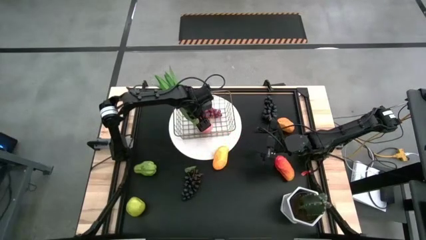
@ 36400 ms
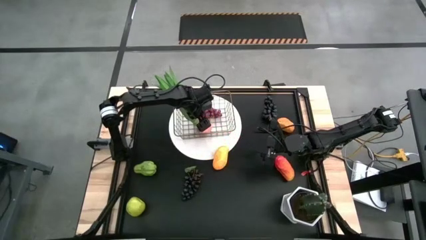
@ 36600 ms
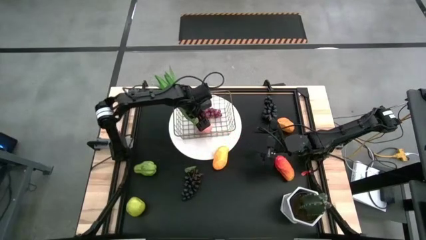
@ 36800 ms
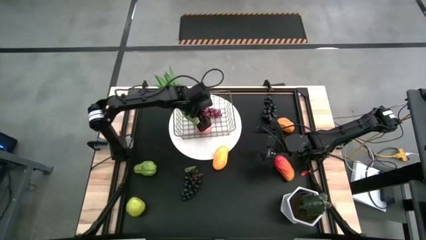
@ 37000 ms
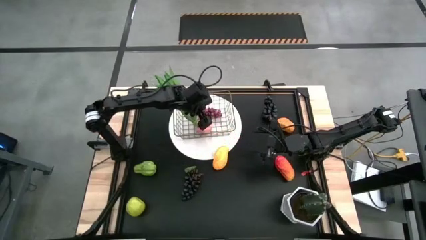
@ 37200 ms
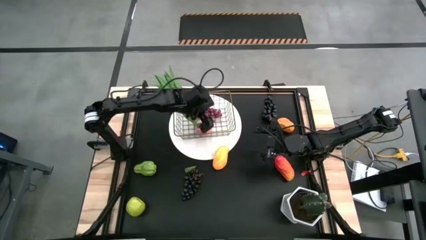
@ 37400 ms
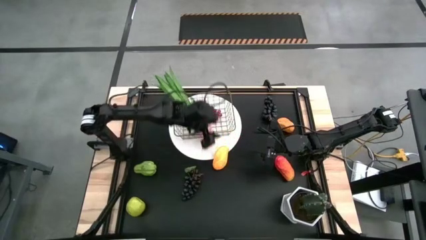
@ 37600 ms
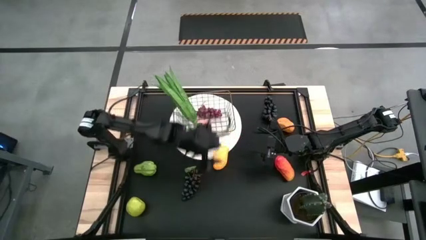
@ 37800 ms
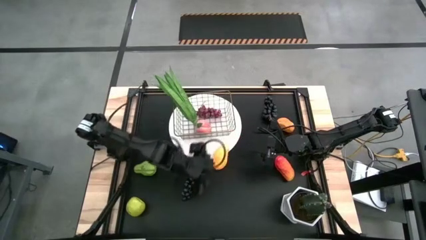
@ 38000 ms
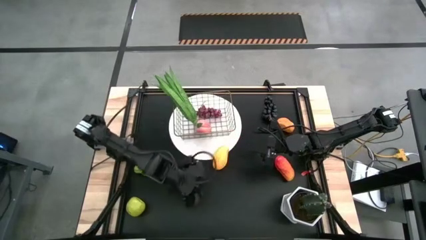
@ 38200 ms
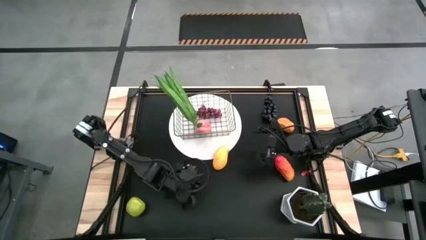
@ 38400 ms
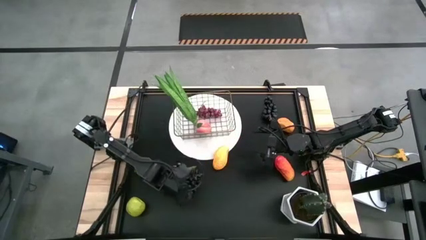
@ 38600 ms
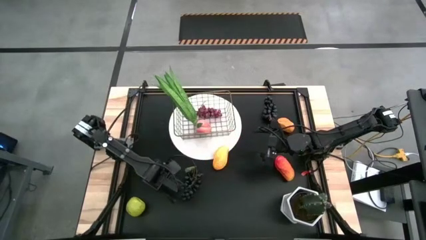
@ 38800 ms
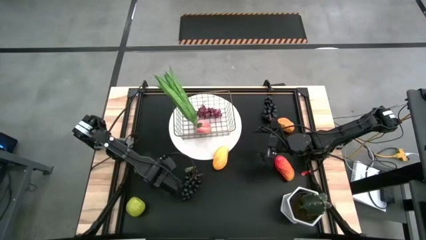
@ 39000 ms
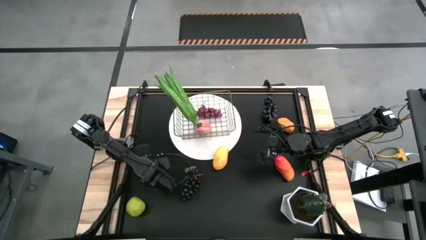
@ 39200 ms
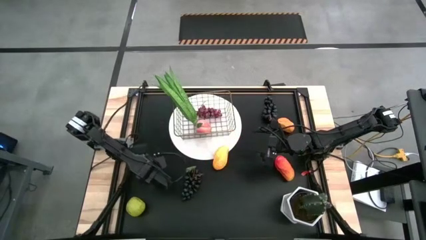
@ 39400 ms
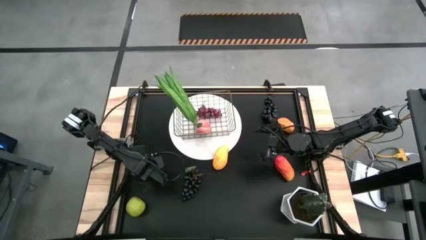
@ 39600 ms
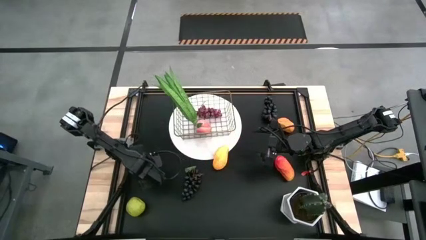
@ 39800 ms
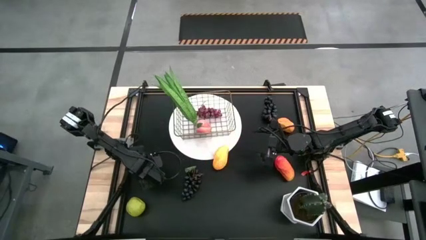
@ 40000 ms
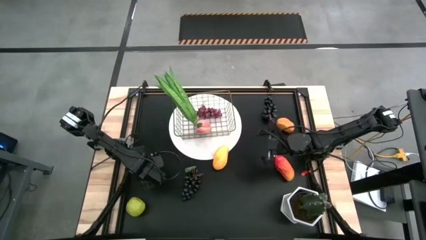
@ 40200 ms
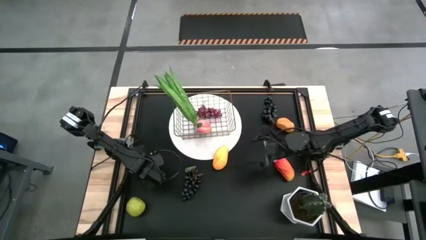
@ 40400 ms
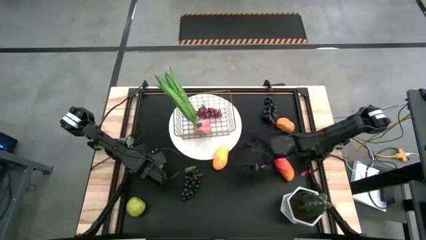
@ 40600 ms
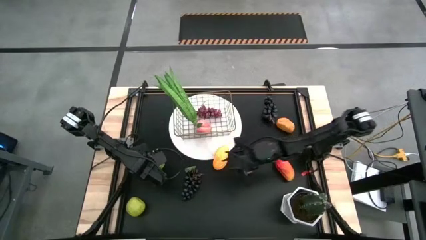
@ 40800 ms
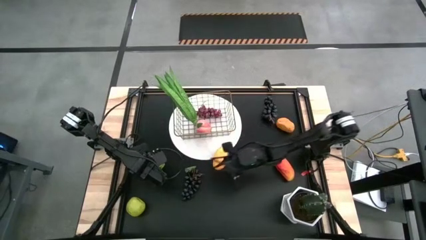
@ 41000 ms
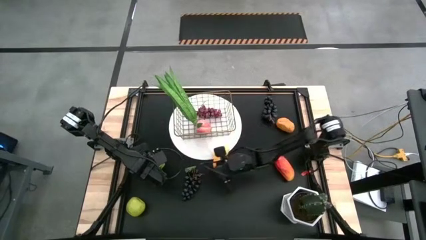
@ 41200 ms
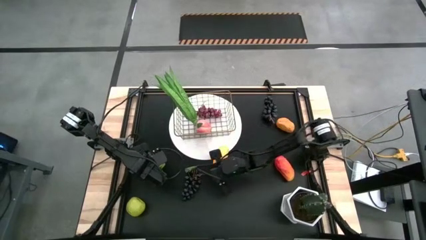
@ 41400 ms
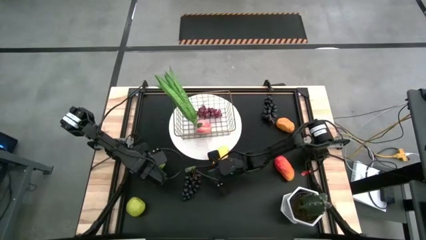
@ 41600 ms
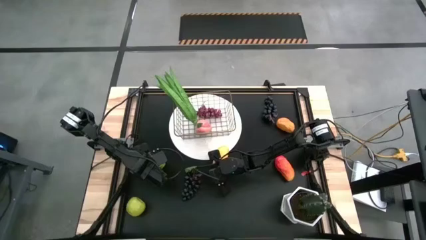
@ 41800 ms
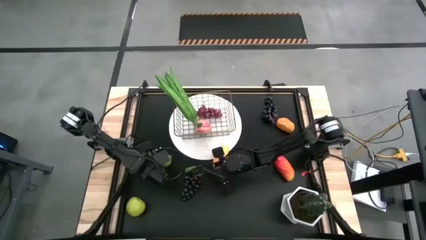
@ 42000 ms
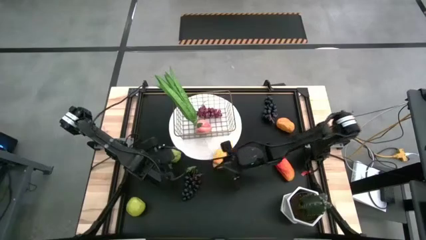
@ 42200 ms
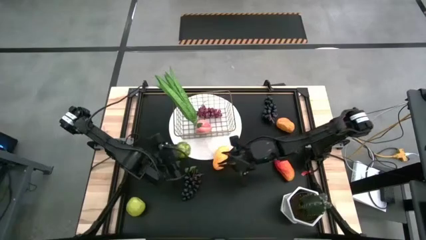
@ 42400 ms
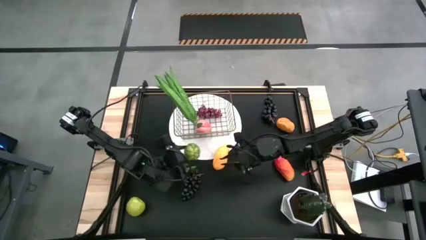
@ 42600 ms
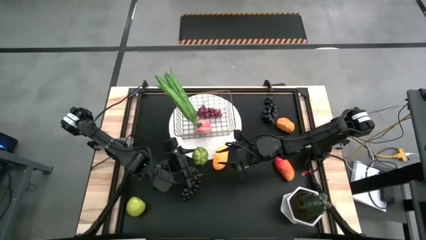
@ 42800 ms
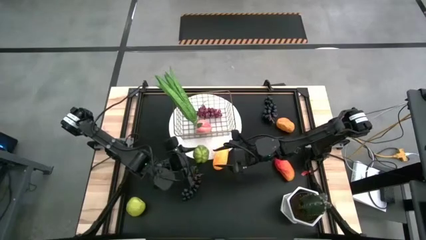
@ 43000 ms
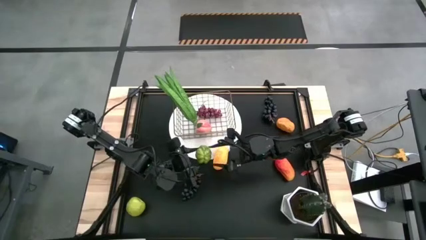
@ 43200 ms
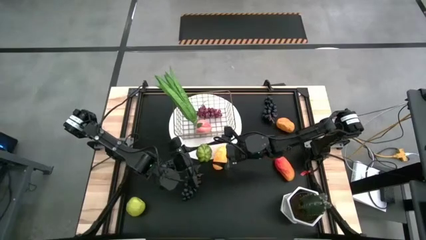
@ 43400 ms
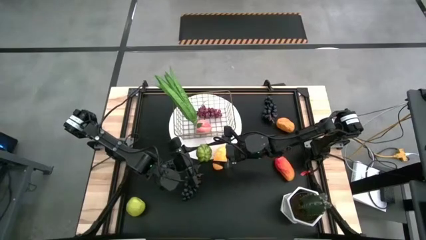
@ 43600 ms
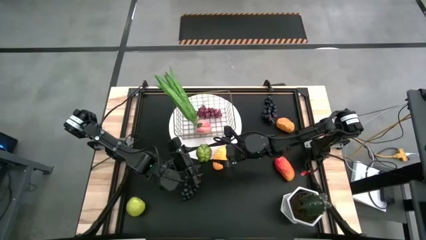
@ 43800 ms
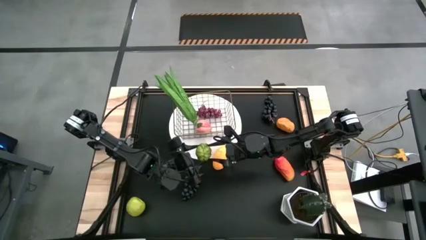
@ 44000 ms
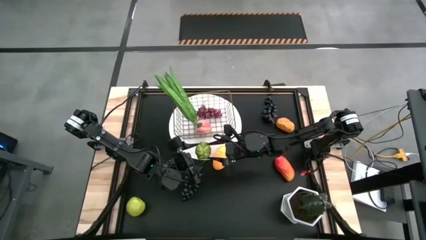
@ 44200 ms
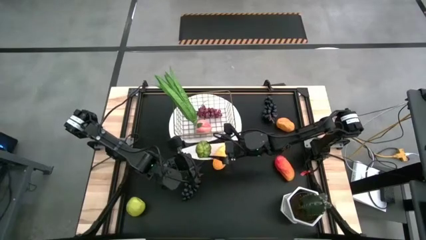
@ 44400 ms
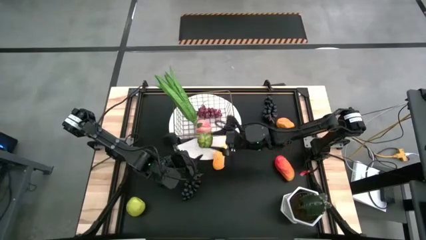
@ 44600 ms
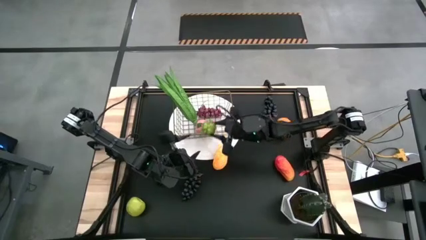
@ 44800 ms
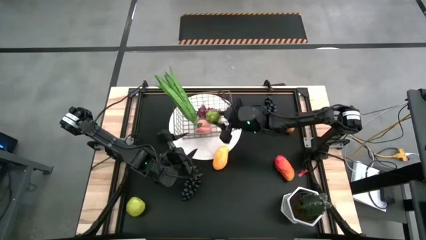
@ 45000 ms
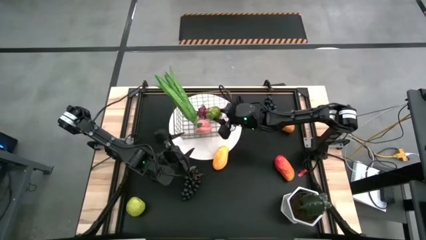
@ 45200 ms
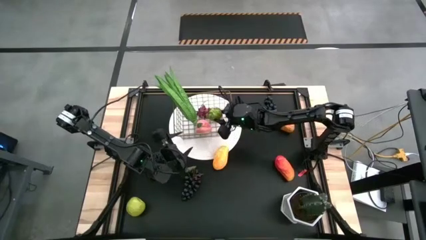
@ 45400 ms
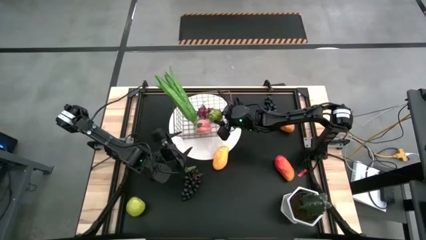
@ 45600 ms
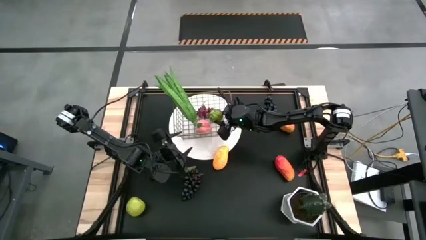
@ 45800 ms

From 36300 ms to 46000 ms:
Task: Build produce basket
Put the green chayote into the gold wire basket

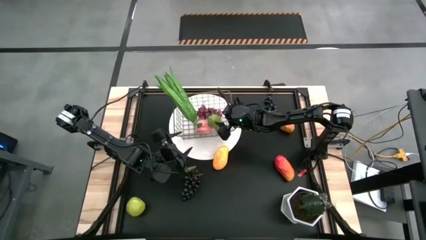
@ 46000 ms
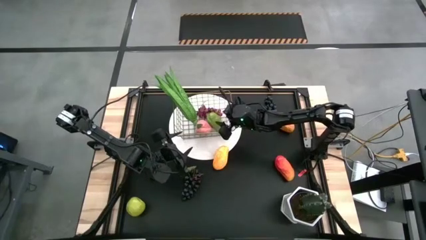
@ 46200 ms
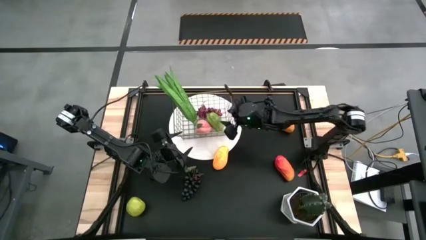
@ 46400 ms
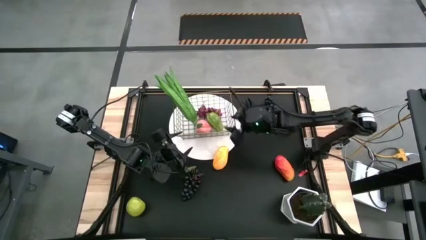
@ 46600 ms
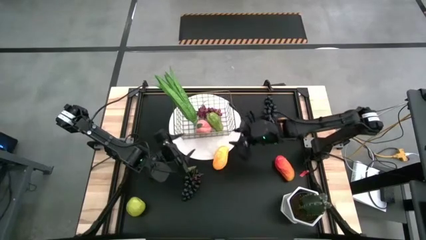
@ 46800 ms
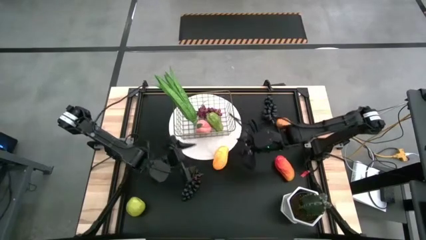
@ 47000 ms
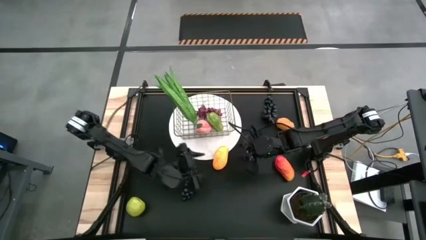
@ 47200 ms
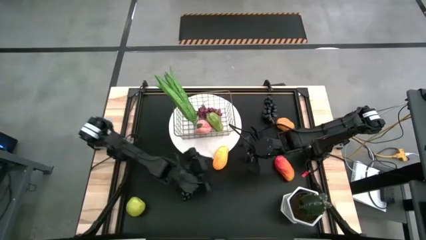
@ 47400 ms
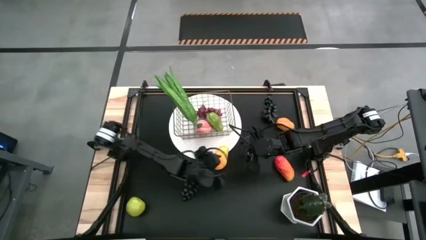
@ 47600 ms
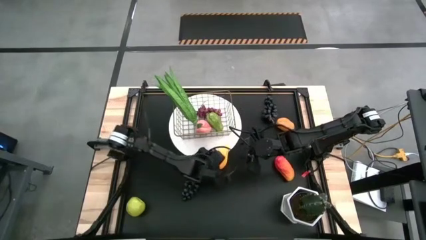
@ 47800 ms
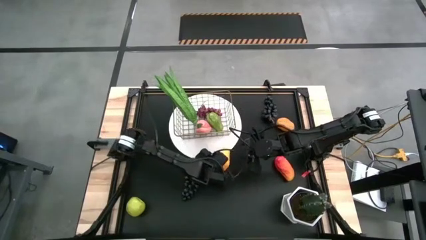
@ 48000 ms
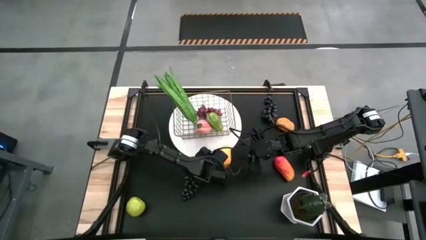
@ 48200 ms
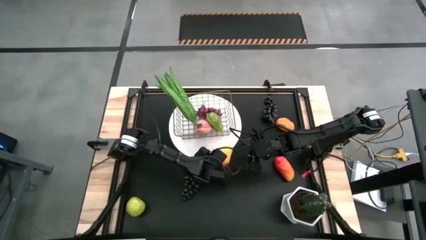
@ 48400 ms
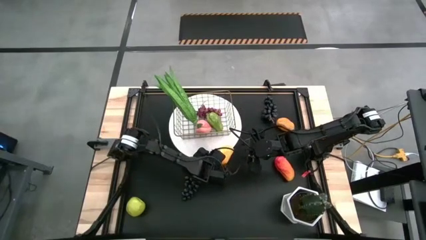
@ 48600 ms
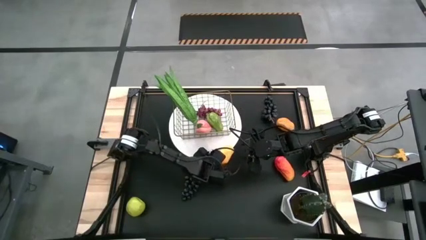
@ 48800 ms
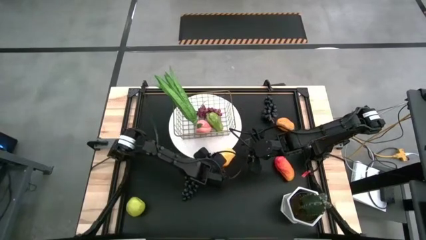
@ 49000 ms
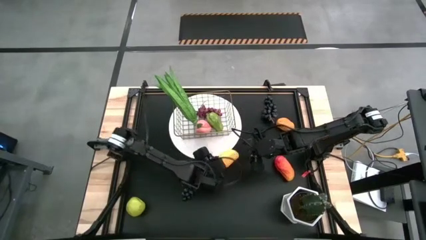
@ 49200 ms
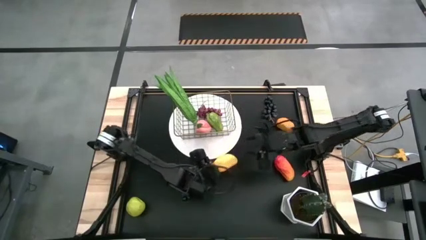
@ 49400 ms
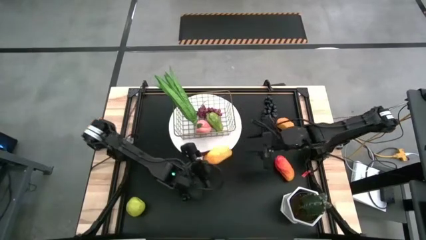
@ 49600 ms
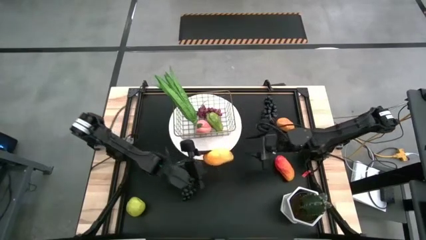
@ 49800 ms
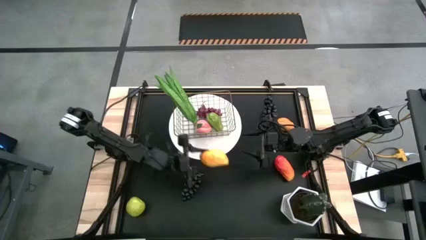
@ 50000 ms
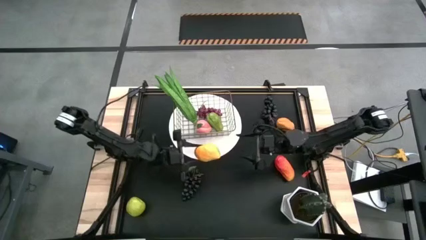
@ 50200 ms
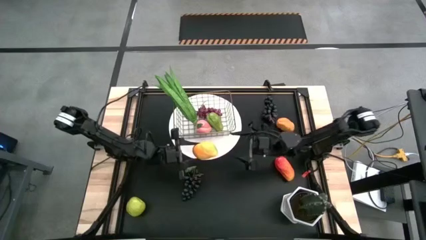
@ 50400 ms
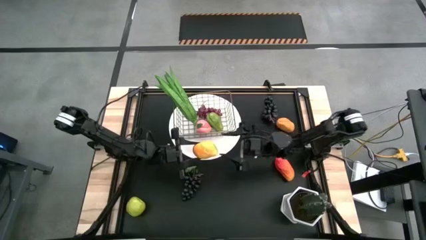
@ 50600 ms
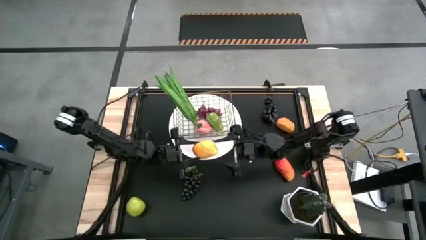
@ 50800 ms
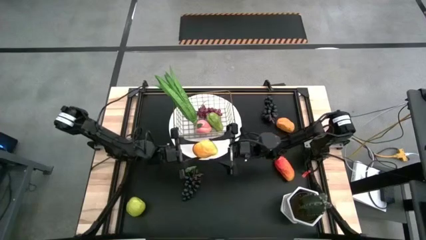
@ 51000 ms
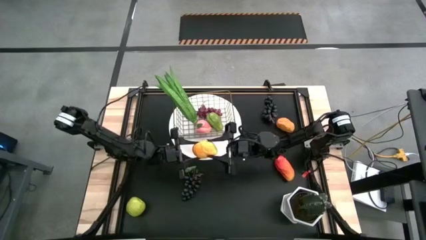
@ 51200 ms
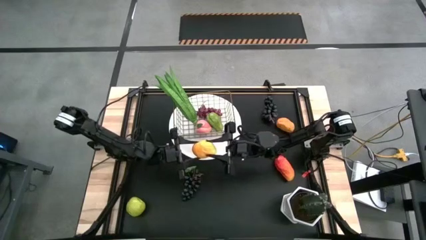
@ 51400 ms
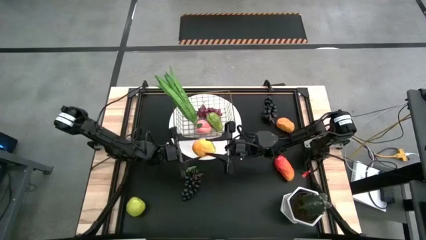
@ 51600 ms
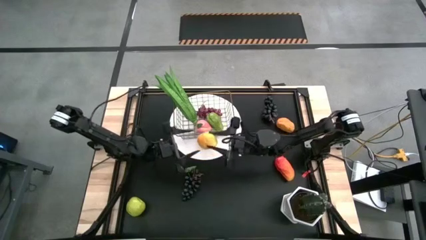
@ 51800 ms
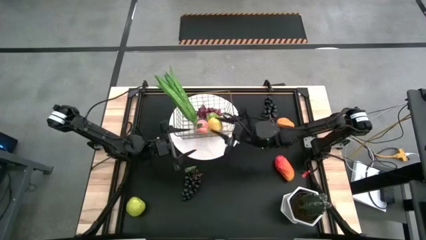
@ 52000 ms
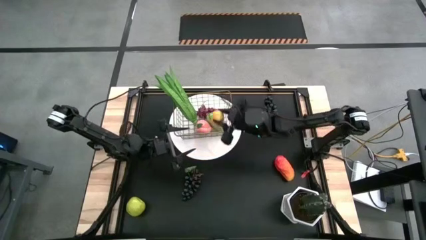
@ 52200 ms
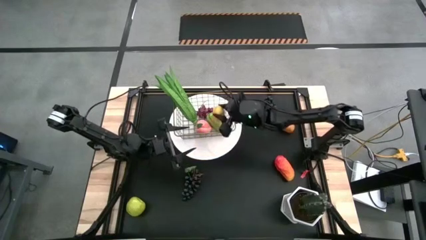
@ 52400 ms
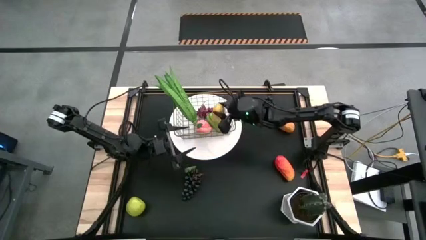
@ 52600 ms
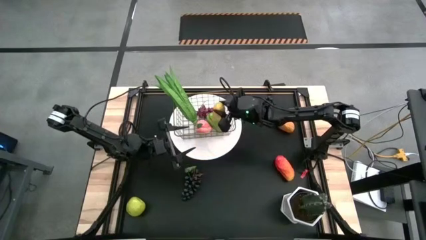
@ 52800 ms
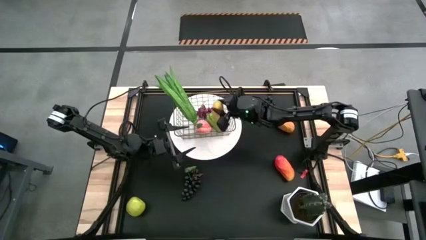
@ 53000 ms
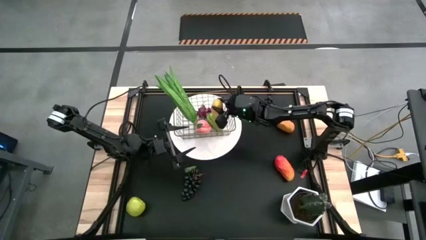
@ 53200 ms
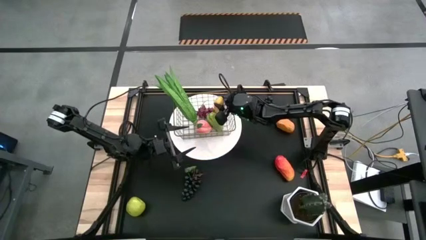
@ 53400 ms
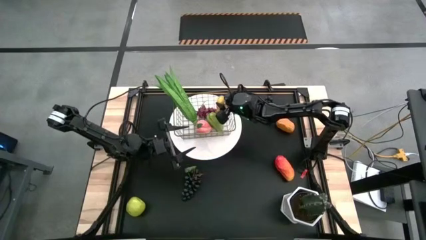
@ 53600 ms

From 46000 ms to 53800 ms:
Put the left yellow mango into the gold wire basket
